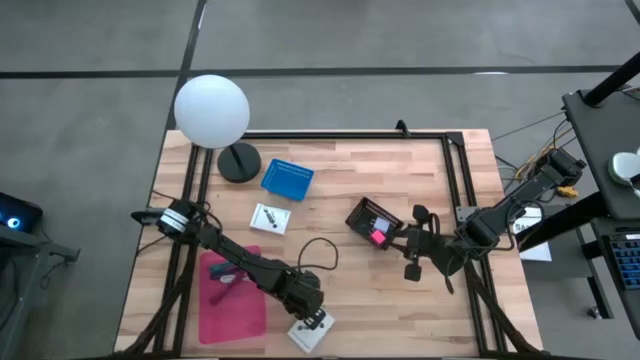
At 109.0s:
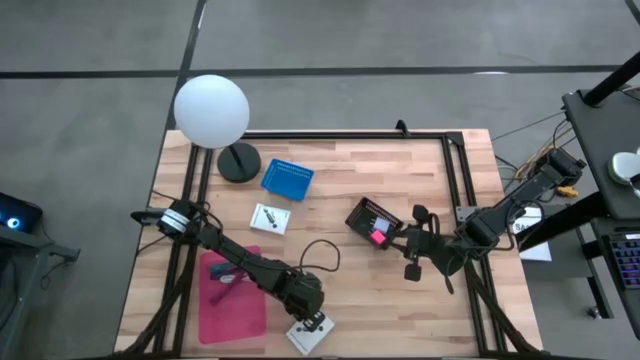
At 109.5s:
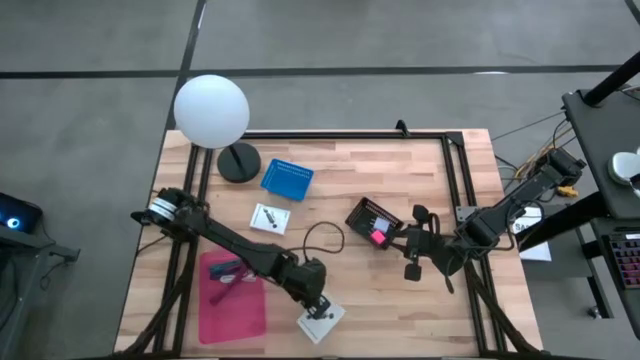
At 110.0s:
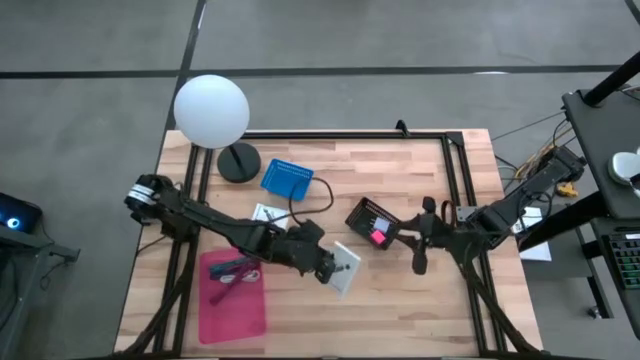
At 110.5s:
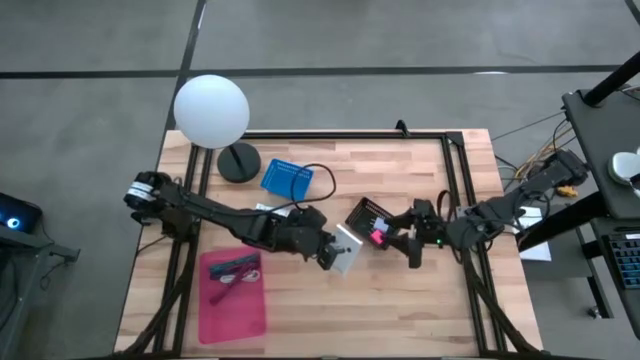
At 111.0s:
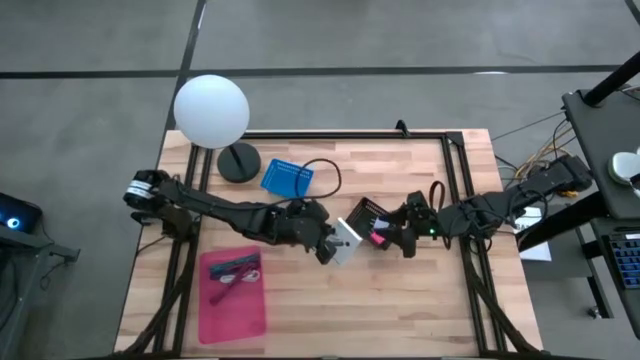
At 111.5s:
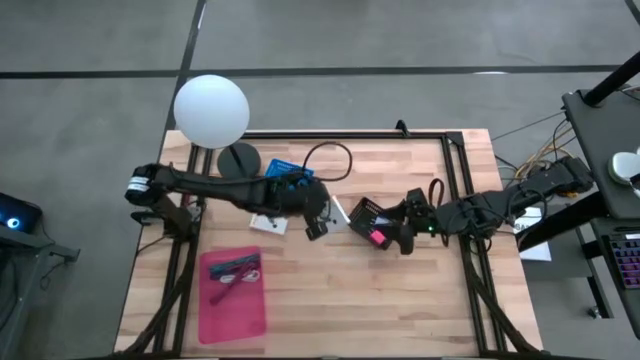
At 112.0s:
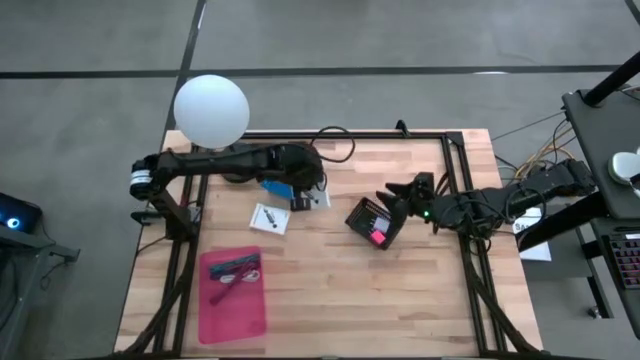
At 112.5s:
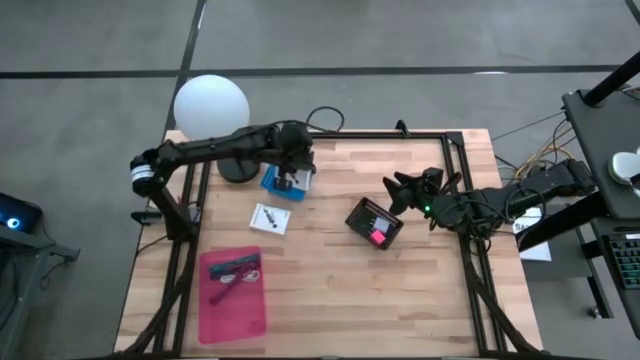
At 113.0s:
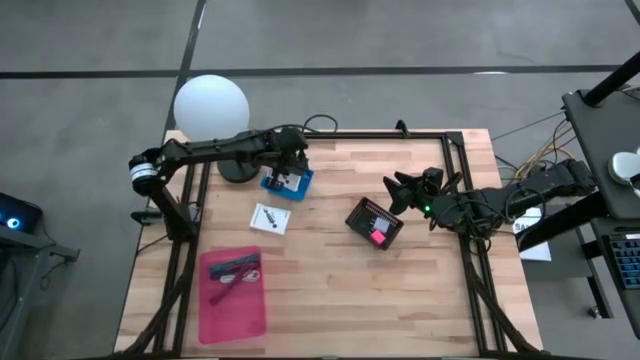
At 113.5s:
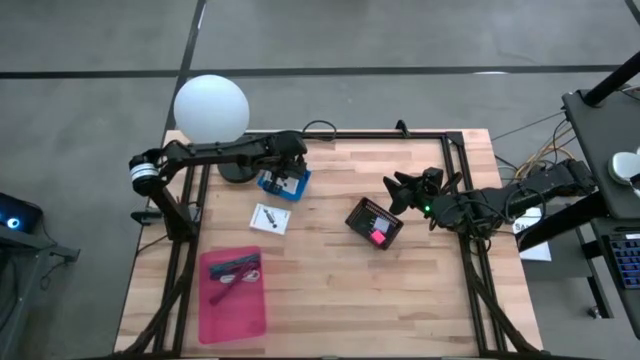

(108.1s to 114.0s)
Task: Pick and place items into bin
Put the bottom white card reader box into the blue bin

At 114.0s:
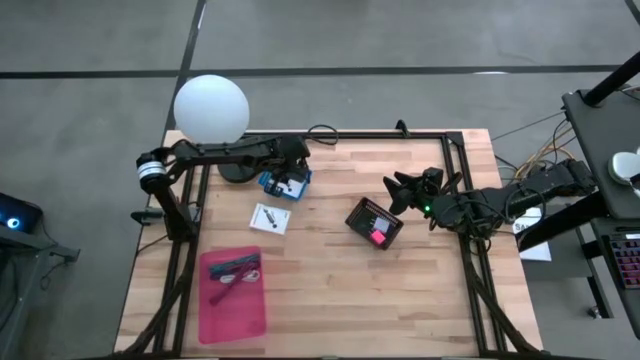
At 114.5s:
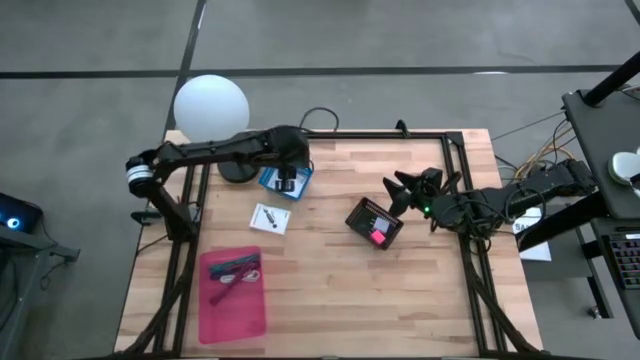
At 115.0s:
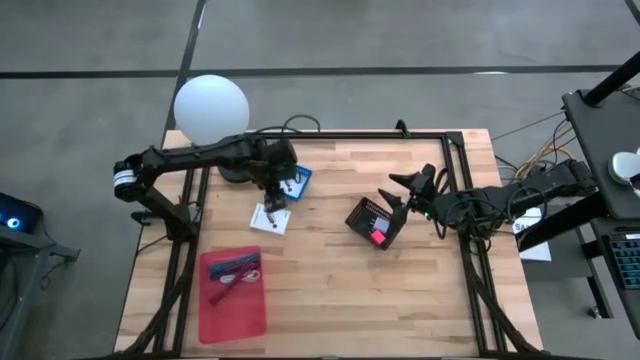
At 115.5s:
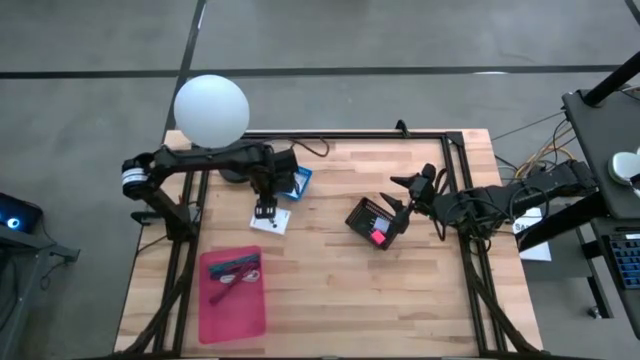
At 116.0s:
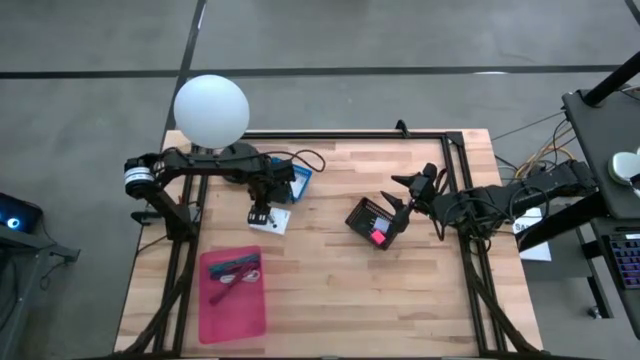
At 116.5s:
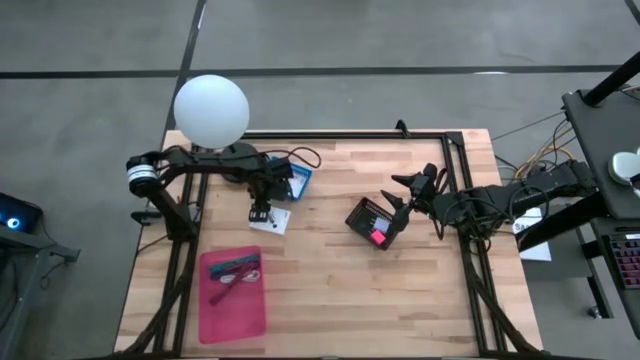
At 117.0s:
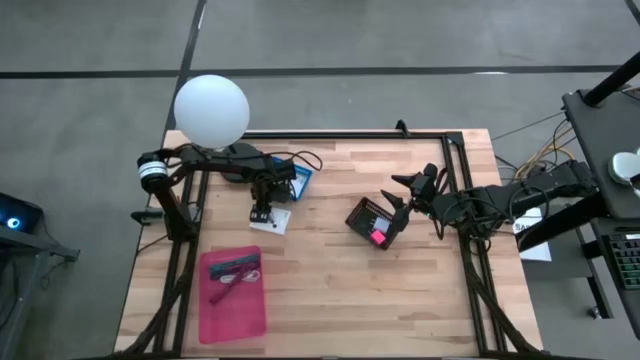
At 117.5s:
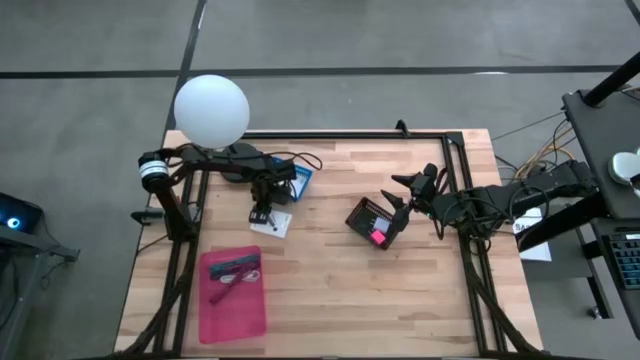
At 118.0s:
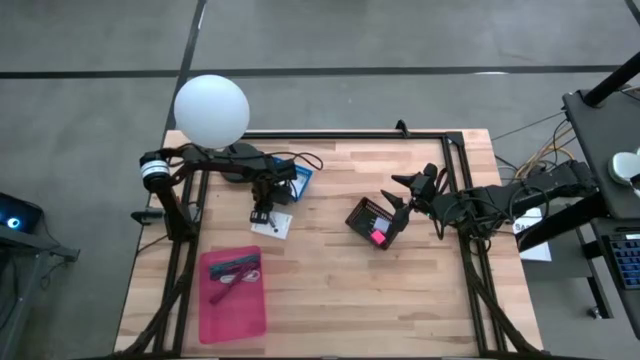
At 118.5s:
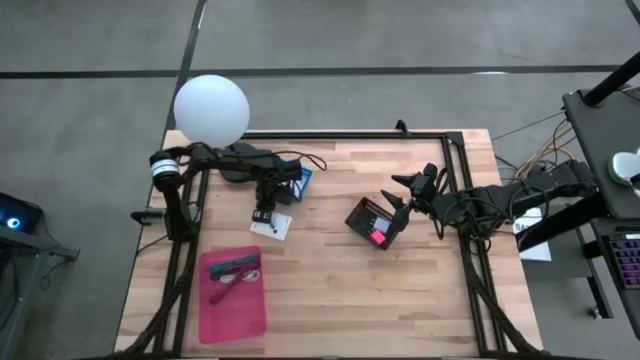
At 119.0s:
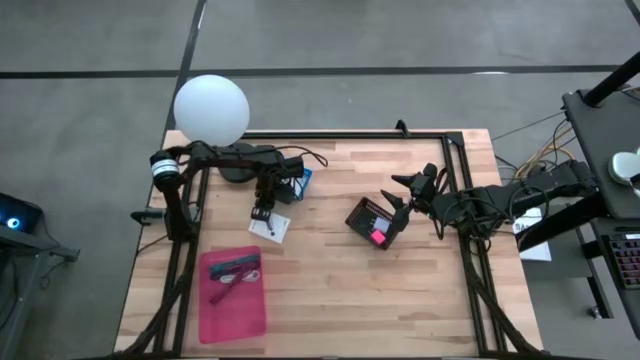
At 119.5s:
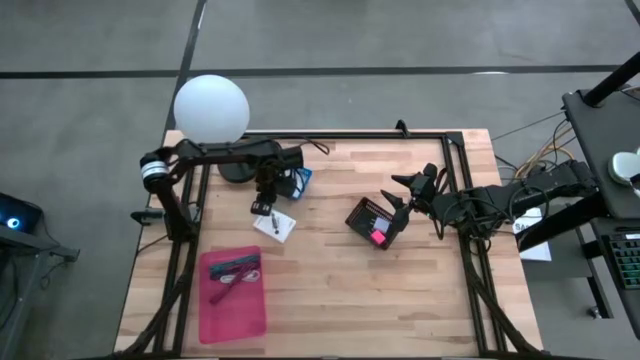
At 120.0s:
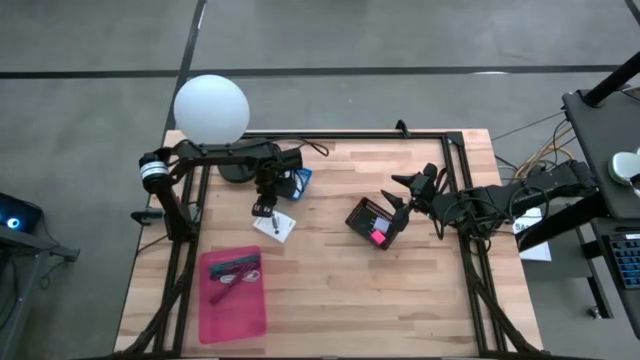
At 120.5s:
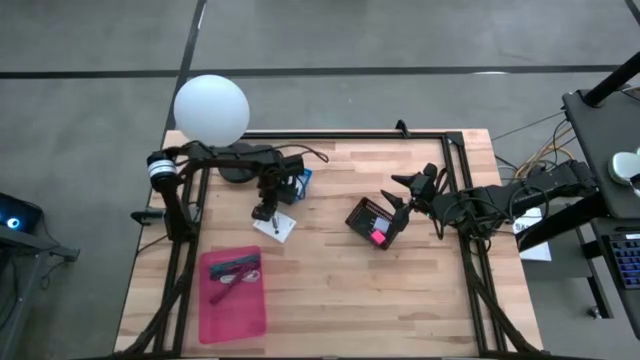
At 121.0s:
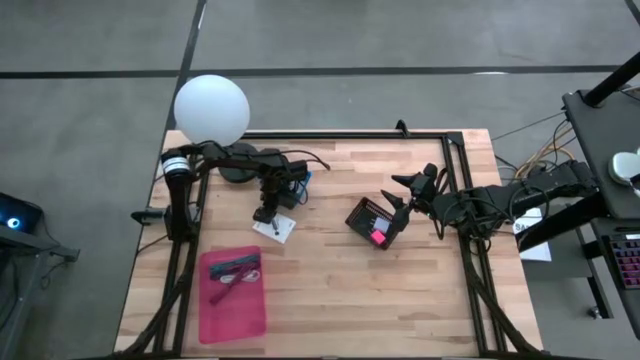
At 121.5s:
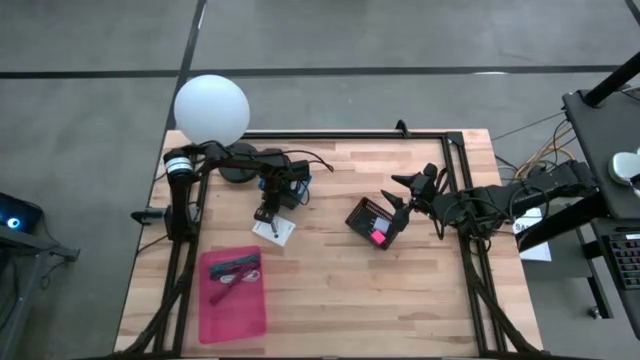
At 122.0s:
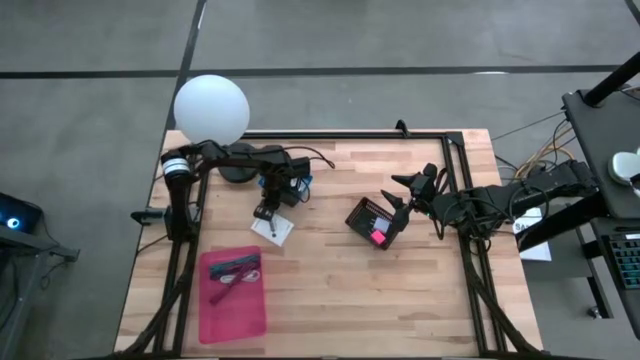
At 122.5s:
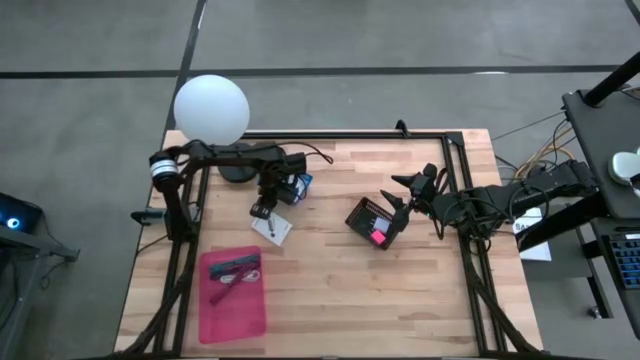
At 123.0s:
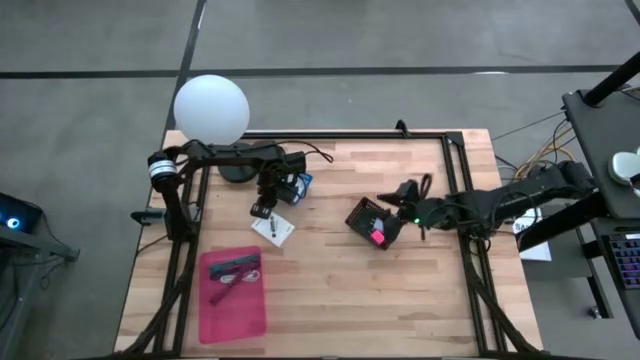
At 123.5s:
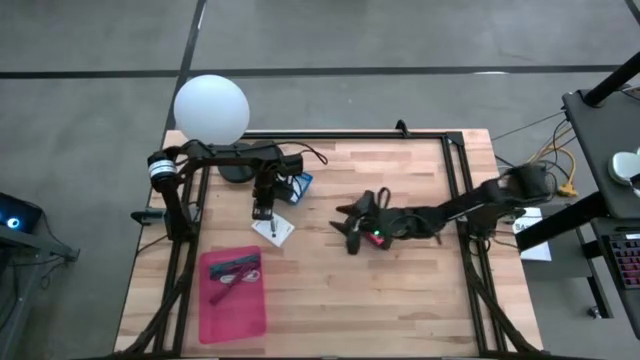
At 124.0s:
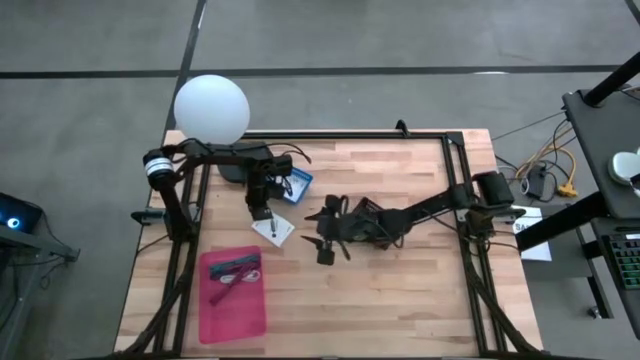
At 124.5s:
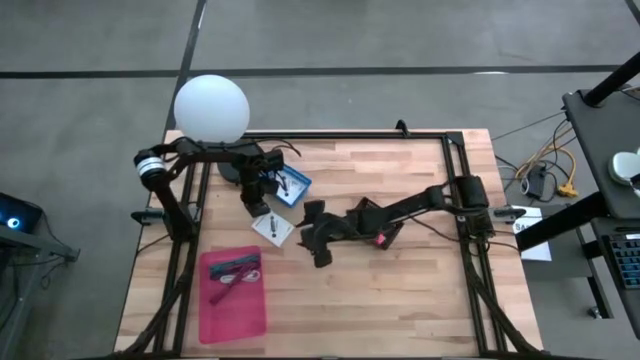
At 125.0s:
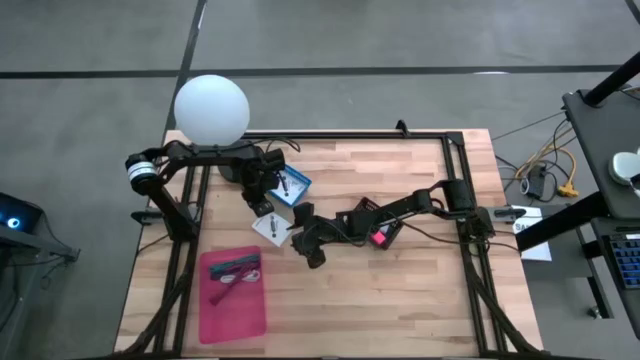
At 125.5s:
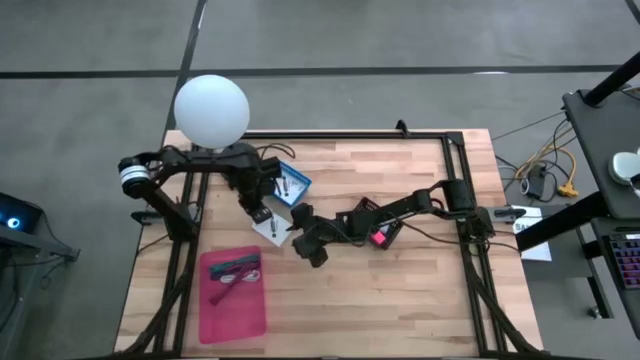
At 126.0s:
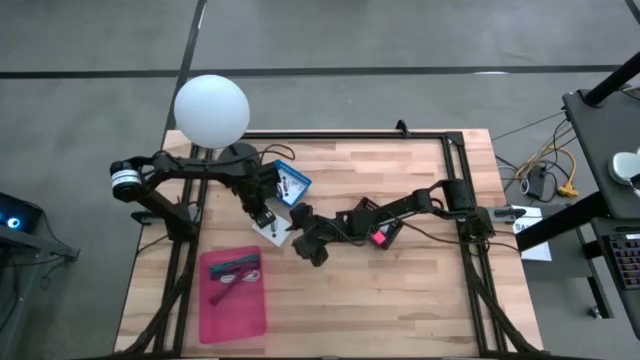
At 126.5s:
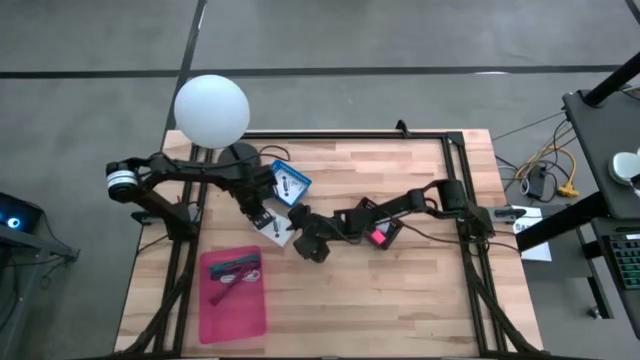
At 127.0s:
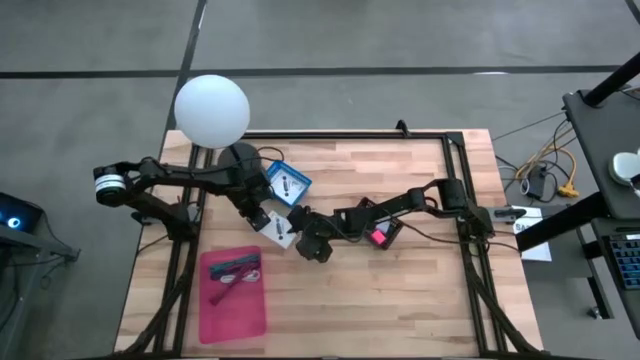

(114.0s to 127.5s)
Put the white card reader box into the blue bin
